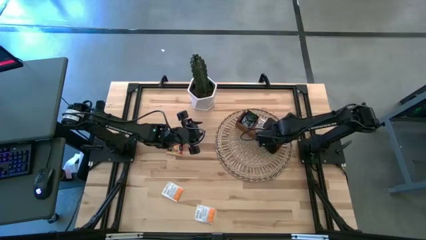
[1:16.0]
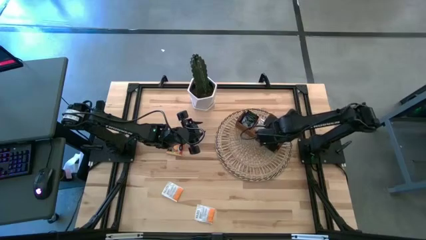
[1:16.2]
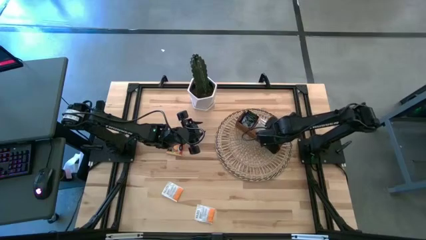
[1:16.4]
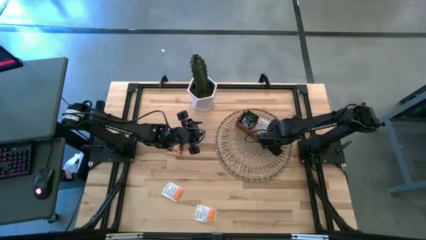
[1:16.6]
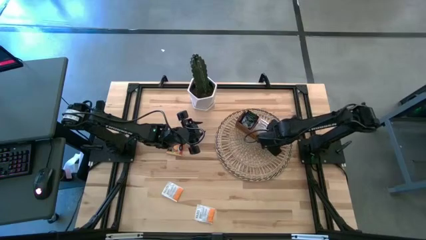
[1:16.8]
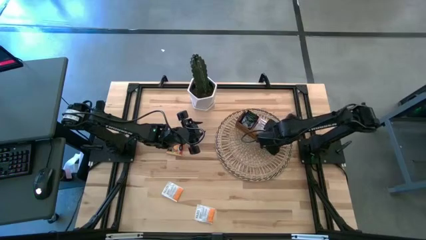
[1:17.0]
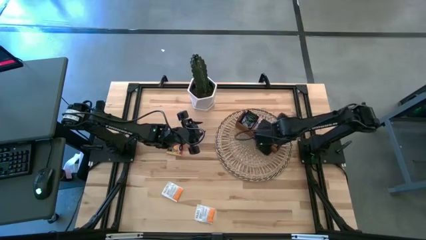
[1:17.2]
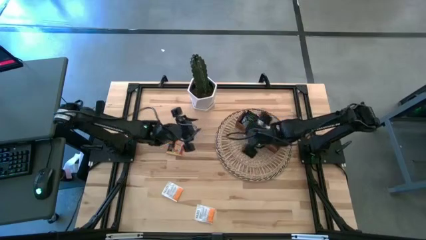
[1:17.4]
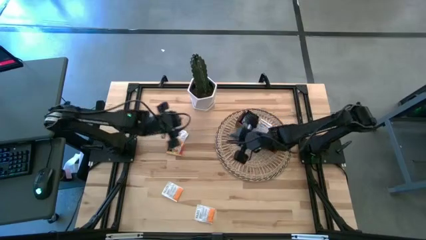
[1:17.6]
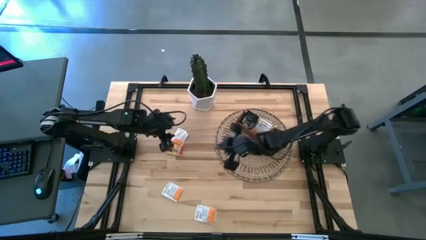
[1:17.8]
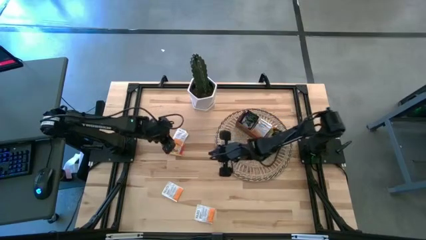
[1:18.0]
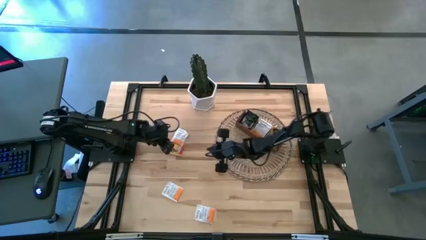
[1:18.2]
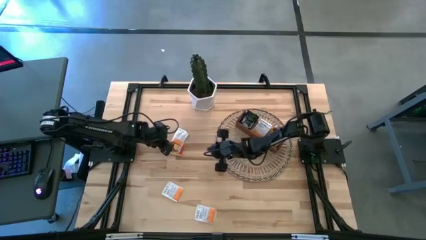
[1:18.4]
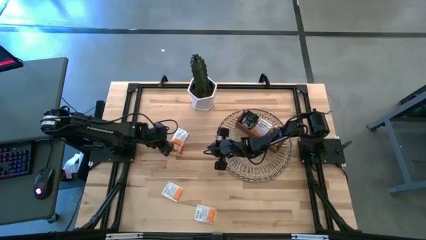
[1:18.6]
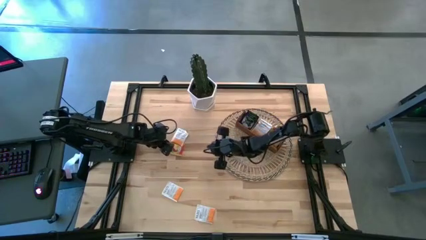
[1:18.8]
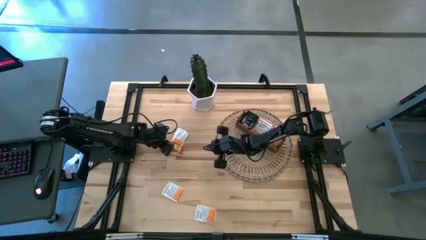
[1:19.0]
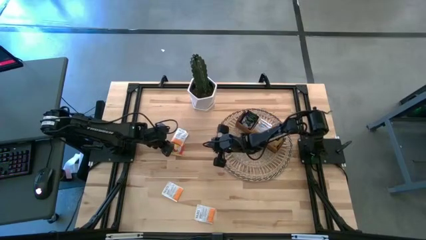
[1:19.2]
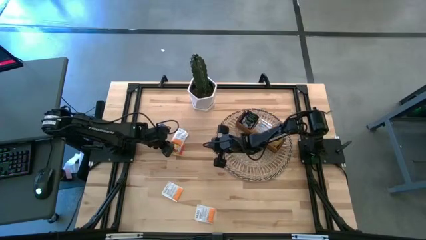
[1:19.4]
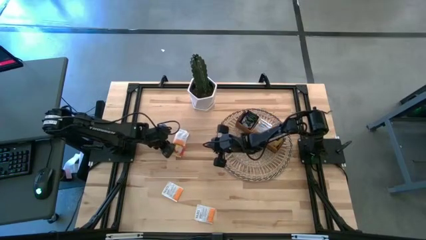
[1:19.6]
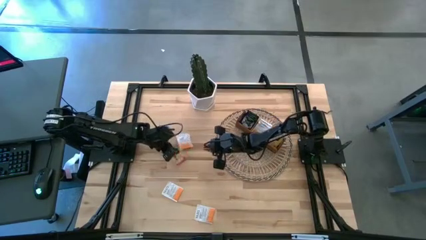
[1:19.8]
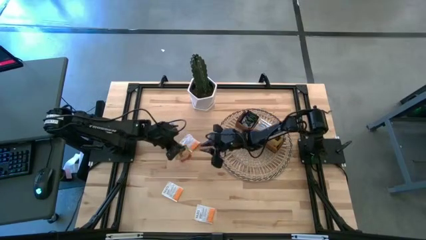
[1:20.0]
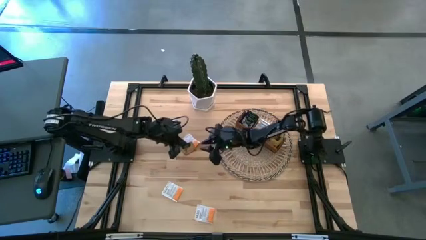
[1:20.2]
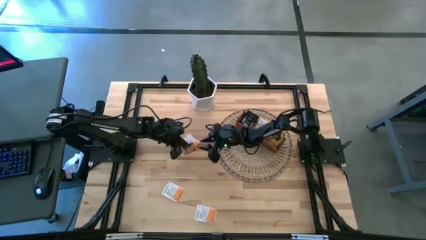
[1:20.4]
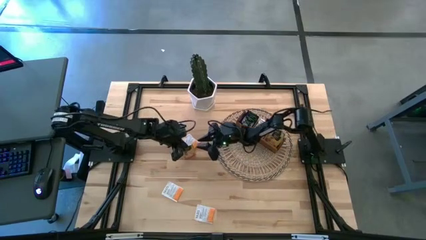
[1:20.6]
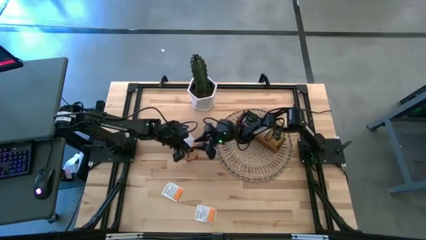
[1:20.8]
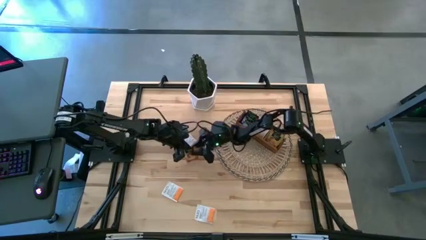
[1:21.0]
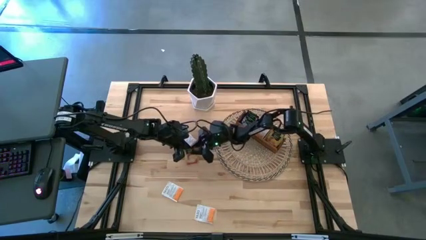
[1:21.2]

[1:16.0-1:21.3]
Task: Pick & Place Tea
Put the orange tea bag into the right section of the wooden organizer

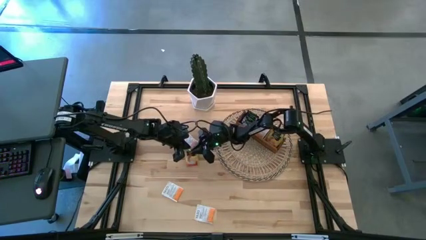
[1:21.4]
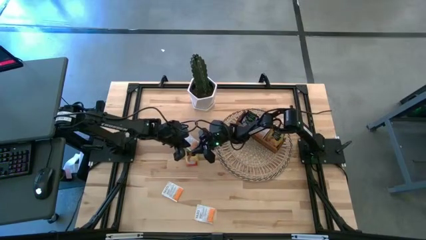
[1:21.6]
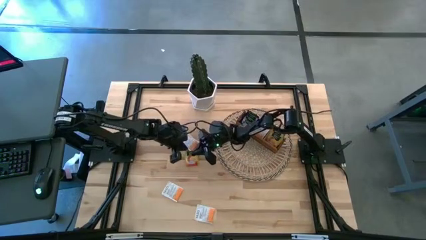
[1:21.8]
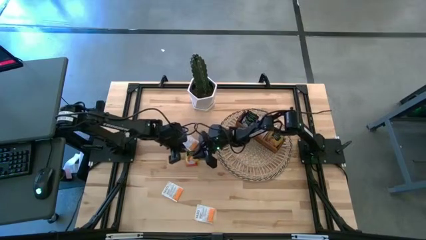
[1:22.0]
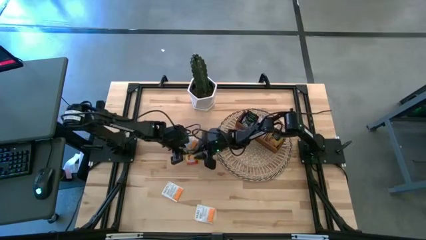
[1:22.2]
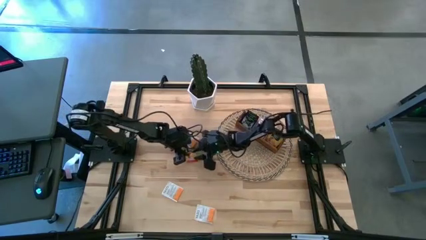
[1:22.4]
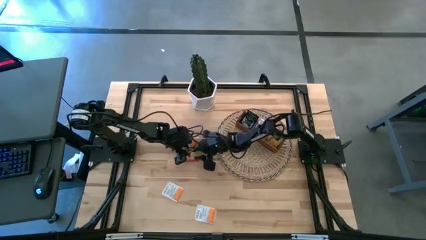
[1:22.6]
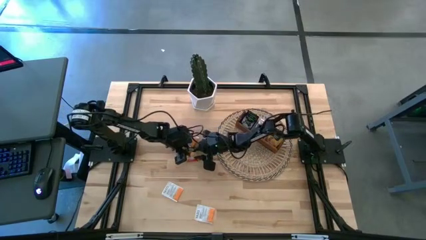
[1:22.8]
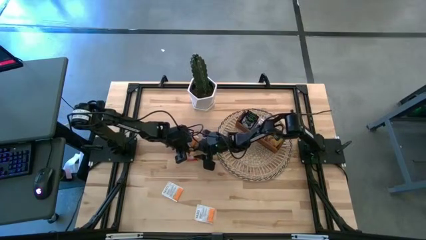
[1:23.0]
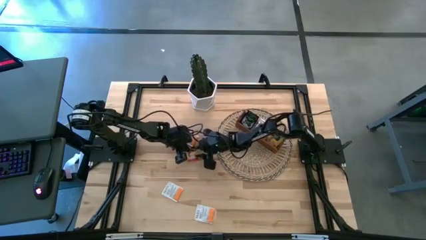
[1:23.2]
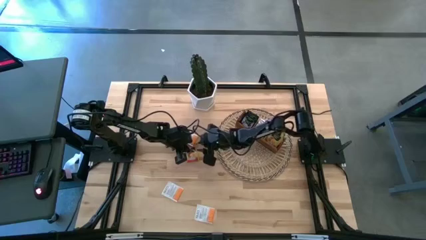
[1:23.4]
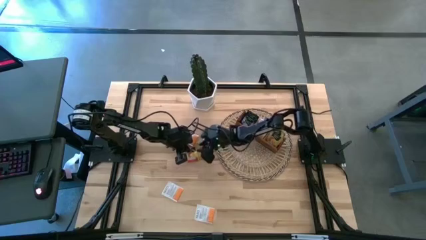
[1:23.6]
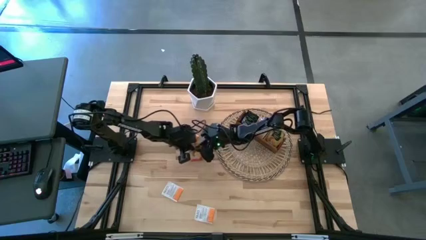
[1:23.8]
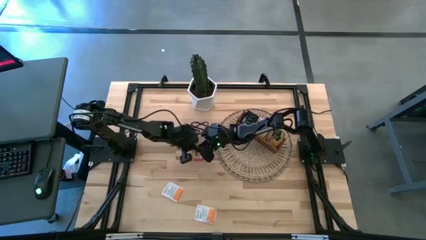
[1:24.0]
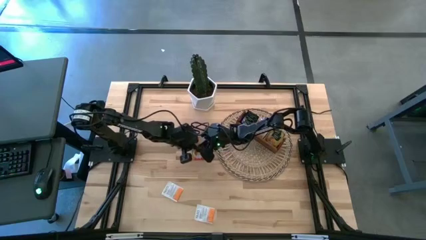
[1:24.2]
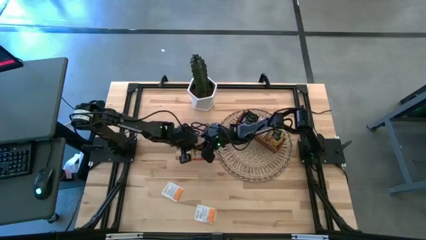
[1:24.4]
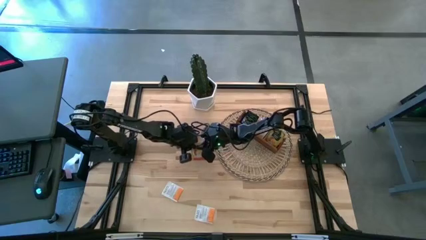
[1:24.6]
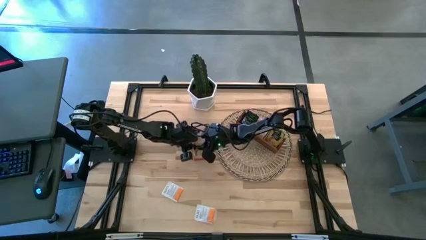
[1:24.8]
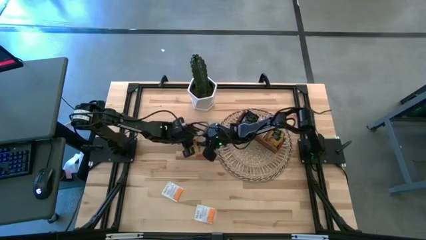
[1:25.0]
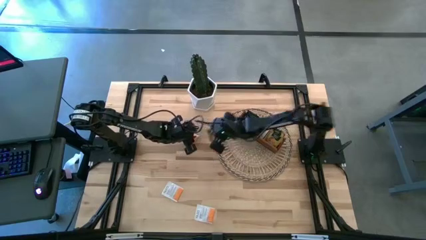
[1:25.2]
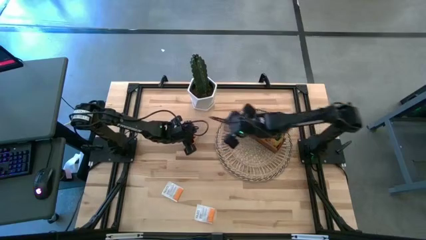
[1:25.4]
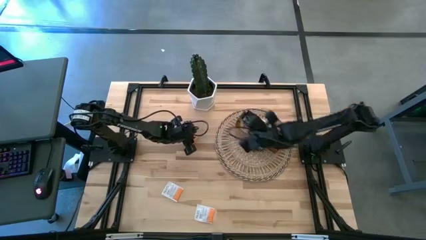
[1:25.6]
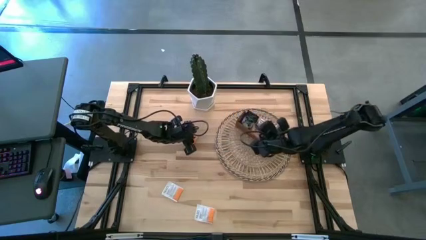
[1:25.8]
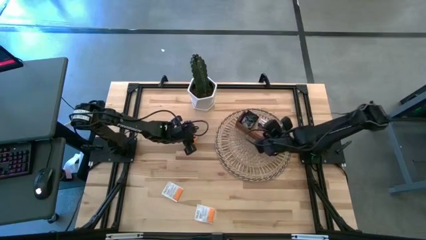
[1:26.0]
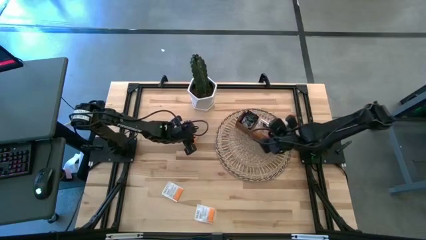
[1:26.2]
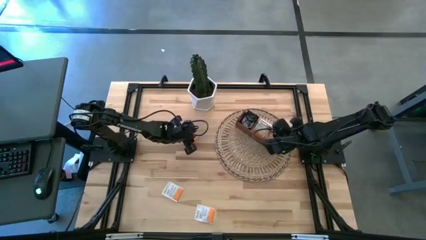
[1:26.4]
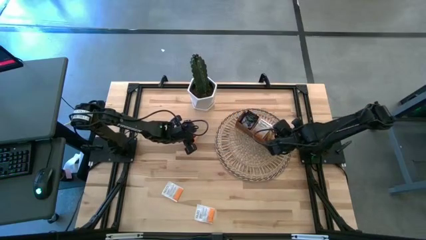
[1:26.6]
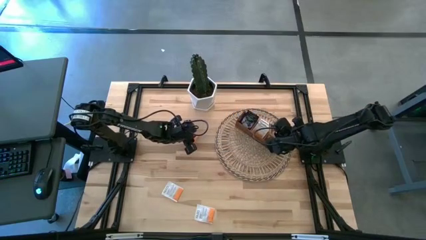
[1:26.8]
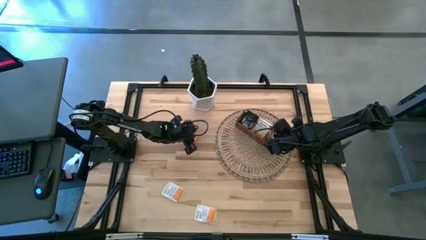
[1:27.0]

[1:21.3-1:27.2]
Put the orange tea bag into the right section of the wooden organizer
